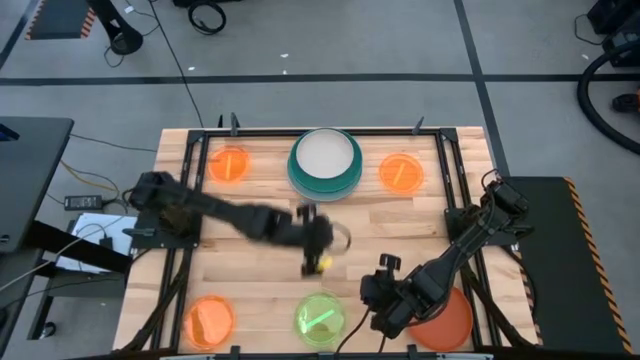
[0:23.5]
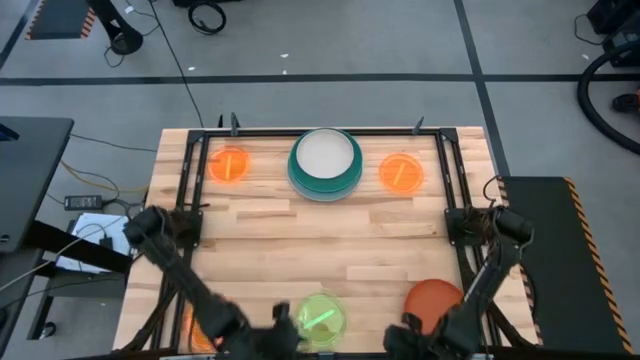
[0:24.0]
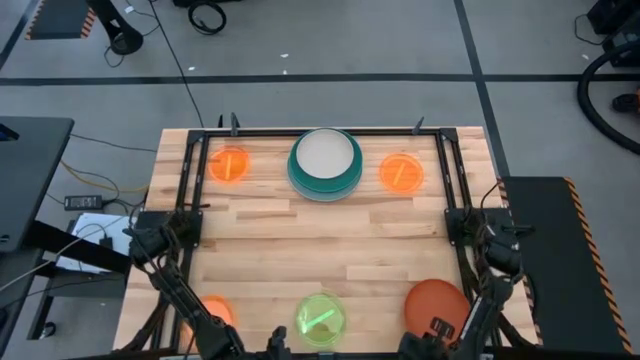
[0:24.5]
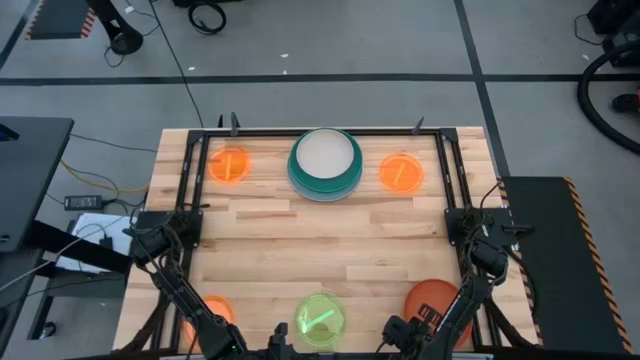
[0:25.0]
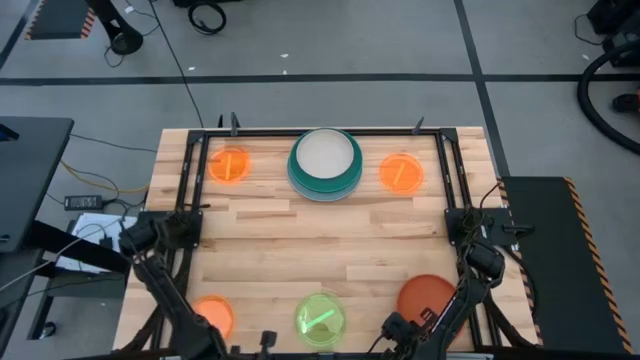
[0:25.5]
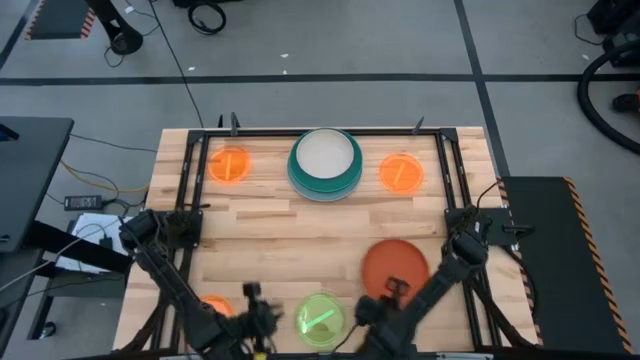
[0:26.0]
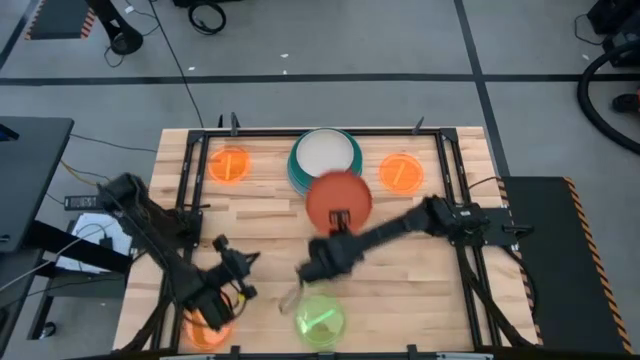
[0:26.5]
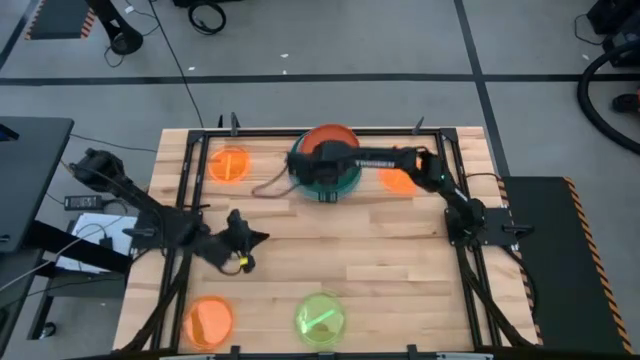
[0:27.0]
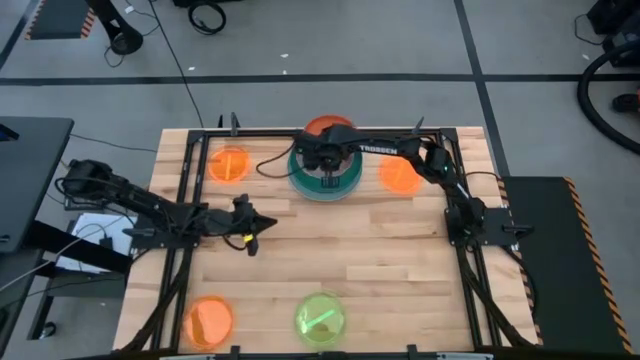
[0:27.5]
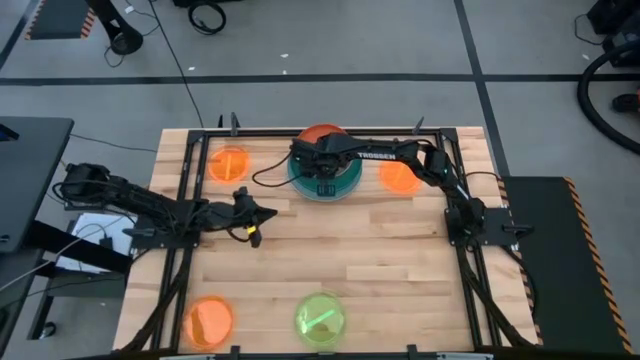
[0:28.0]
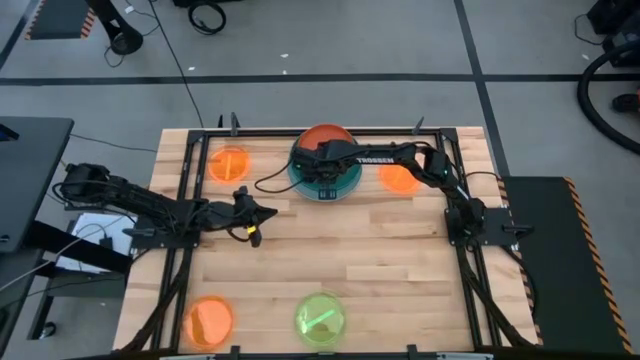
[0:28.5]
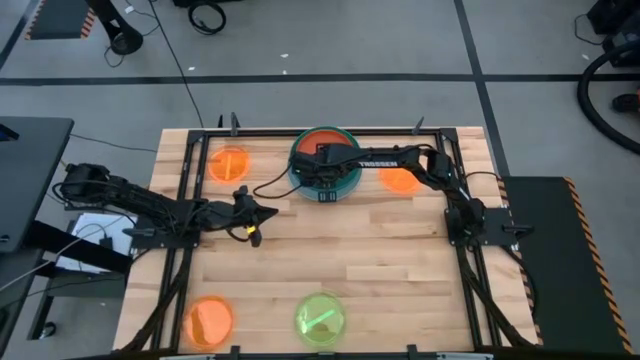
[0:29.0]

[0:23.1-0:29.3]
Task: Stack plastic plates
Stack the dark orange plate on top of the gray plate

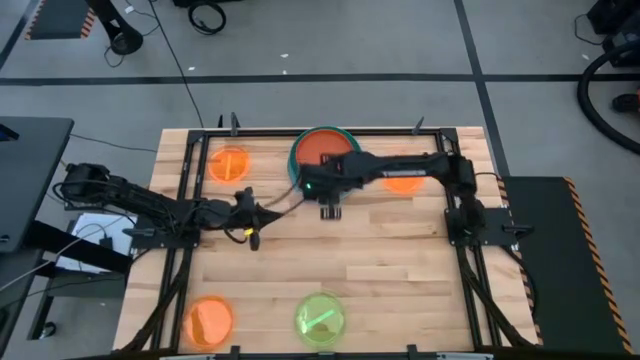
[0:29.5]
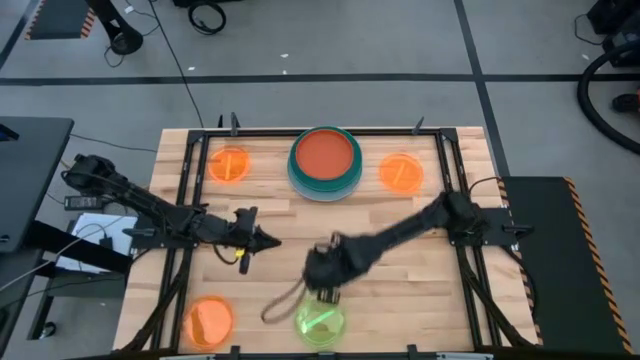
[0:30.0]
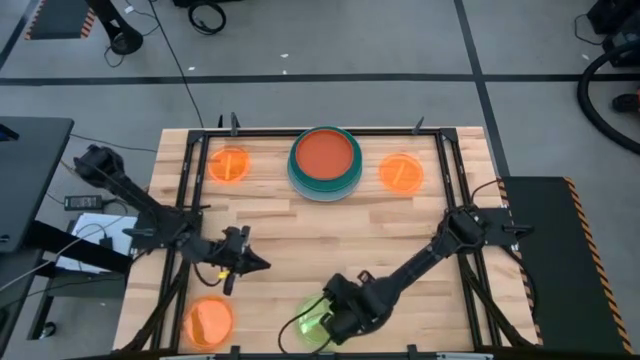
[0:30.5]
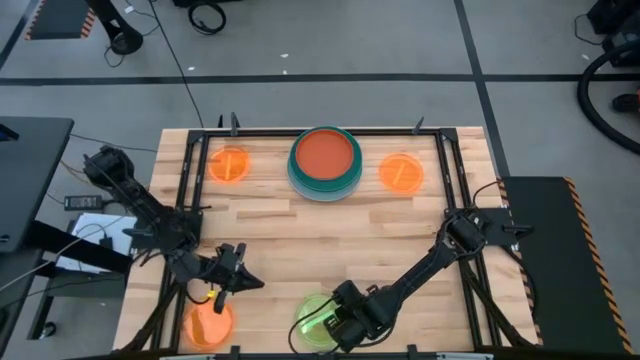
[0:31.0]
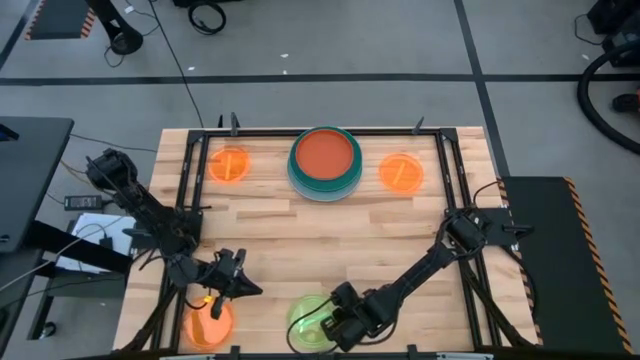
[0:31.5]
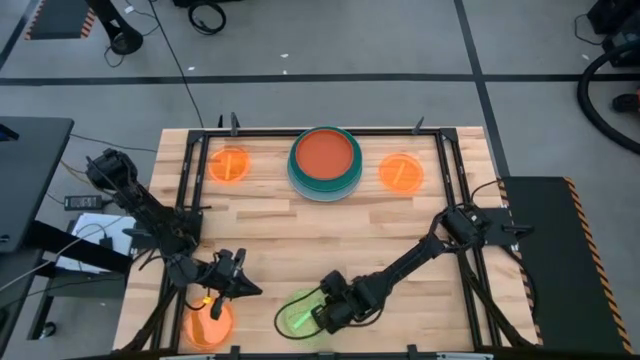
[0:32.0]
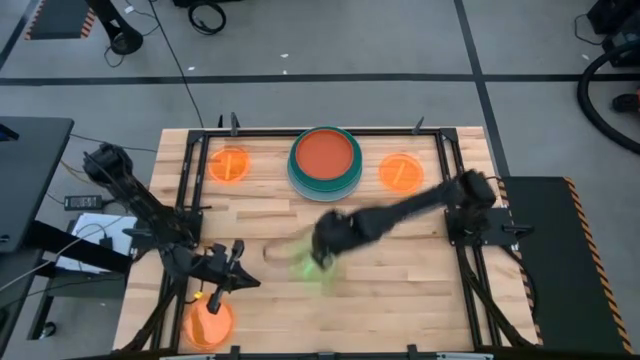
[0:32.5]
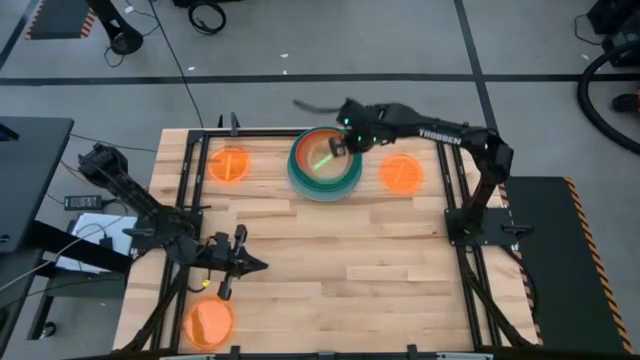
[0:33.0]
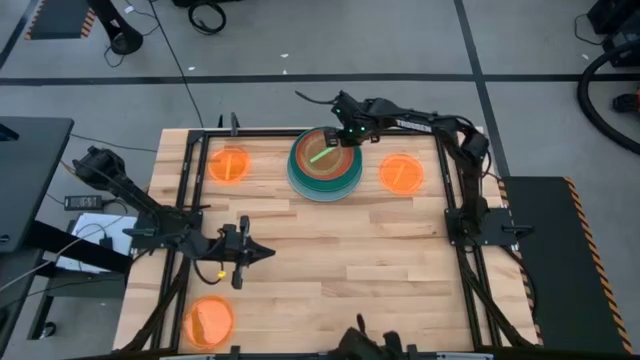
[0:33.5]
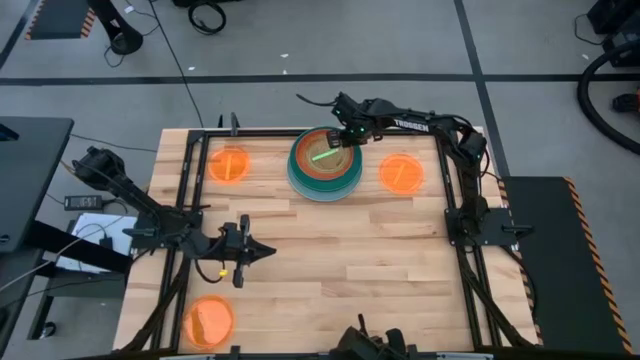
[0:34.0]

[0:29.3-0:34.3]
Stack the light green plate on top of the dark orange plate

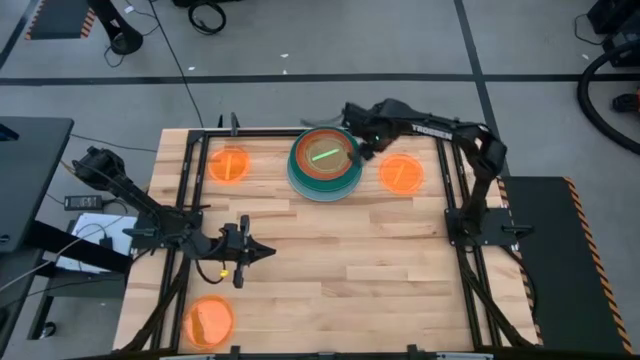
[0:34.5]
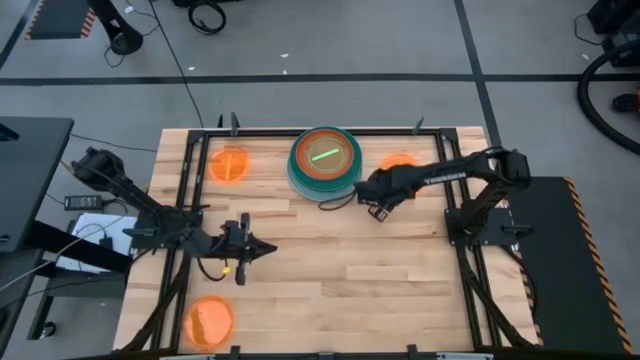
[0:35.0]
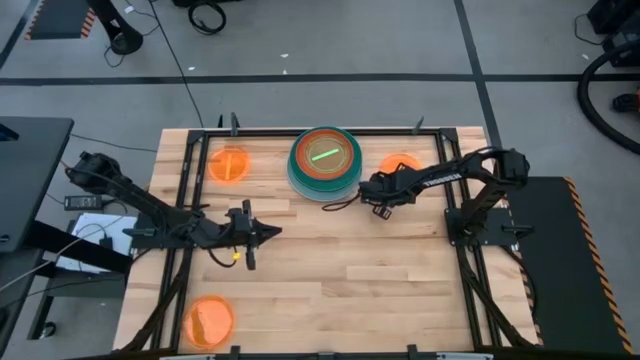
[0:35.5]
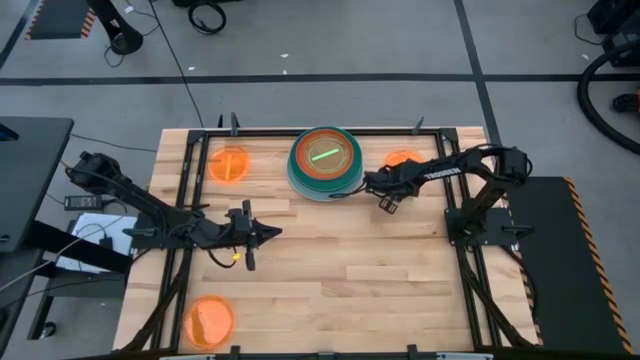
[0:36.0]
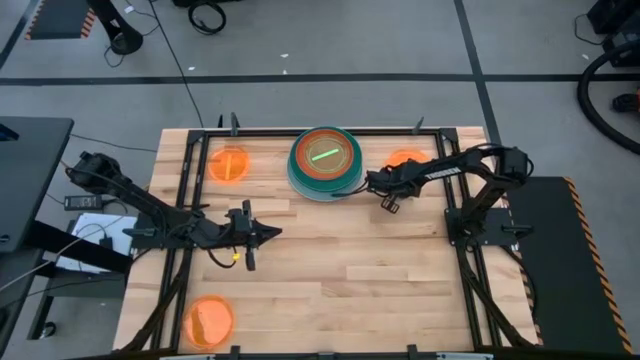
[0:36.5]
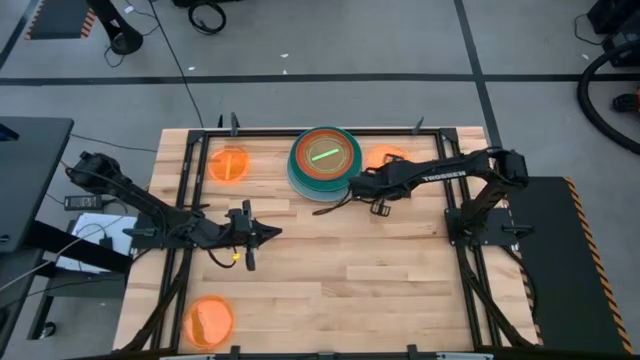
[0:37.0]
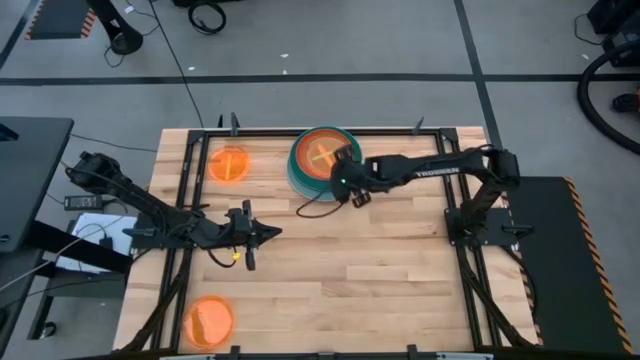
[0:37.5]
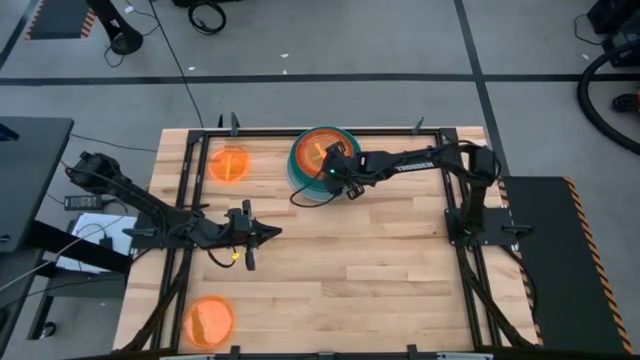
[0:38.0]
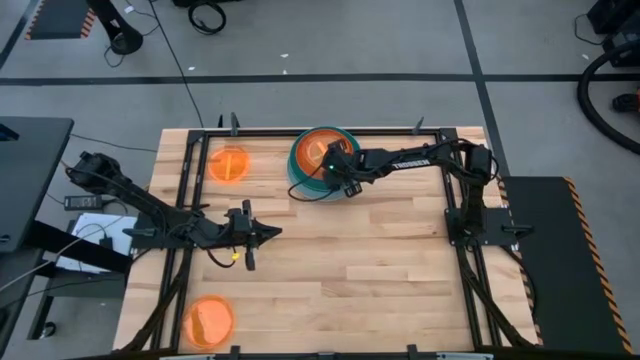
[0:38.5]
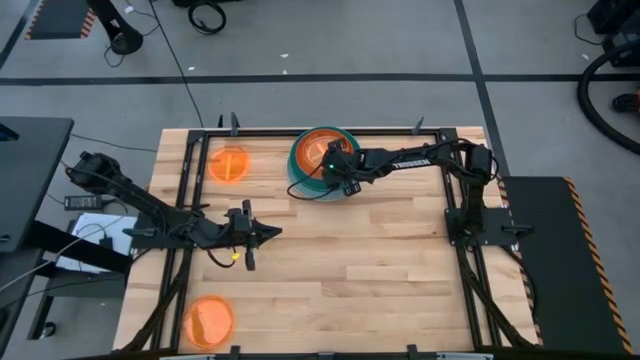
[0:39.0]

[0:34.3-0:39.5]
Stack the top right orange plate on top of light green plate

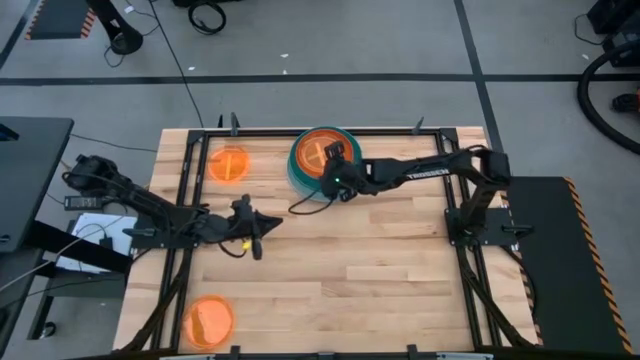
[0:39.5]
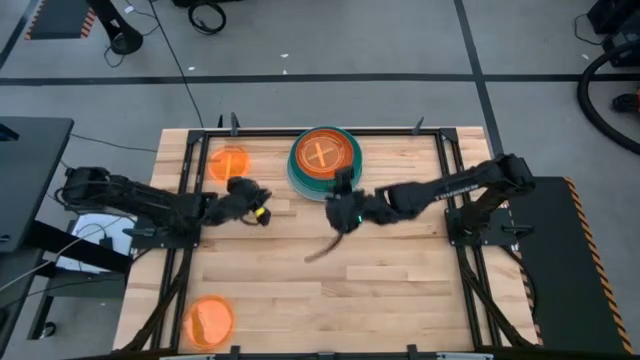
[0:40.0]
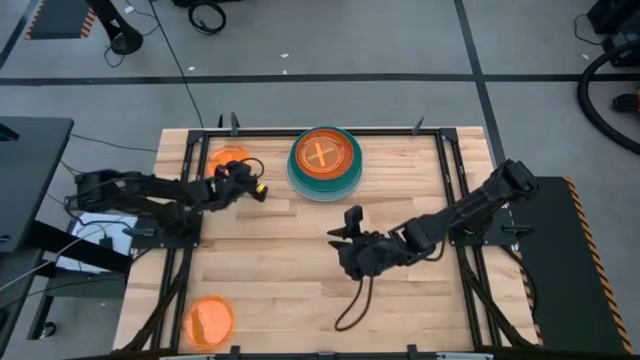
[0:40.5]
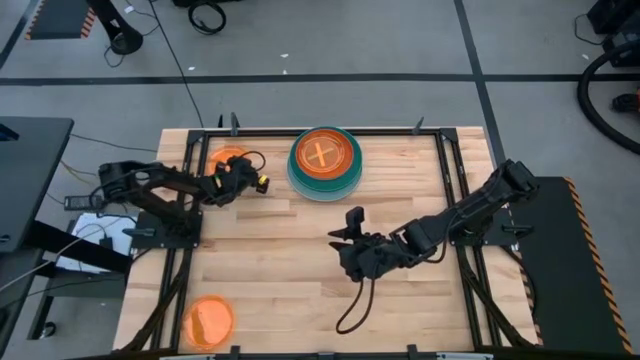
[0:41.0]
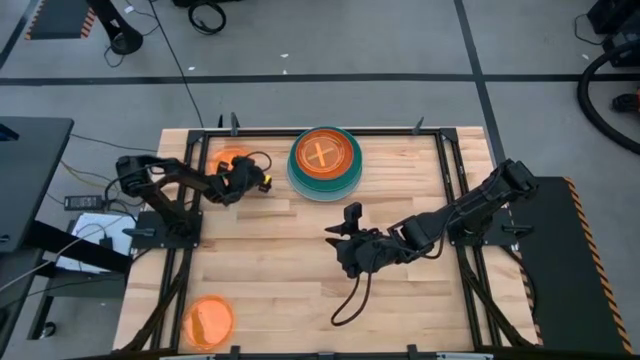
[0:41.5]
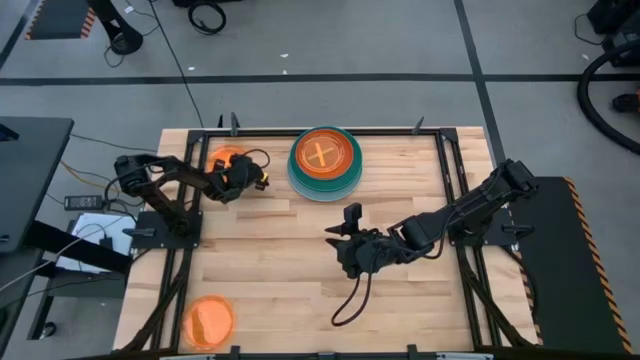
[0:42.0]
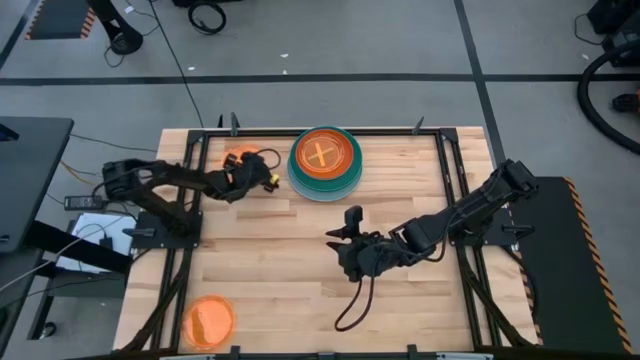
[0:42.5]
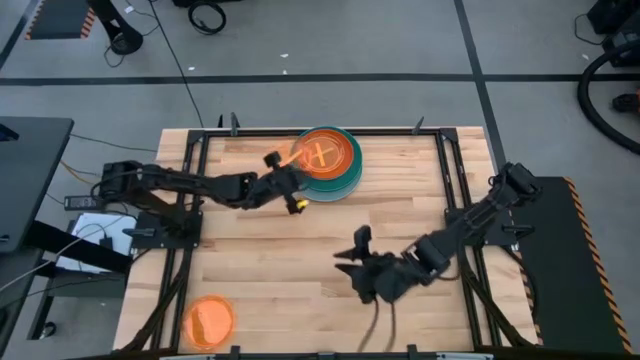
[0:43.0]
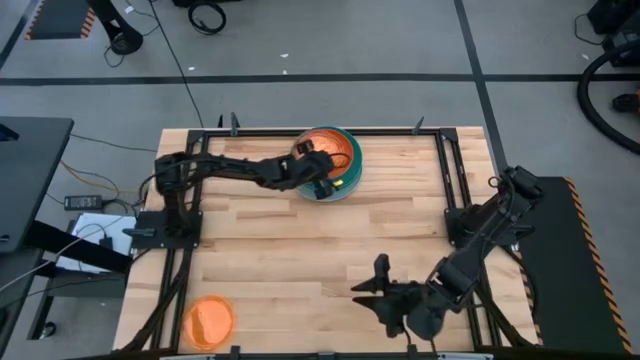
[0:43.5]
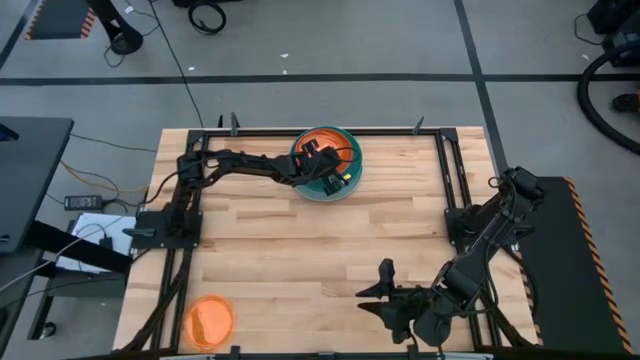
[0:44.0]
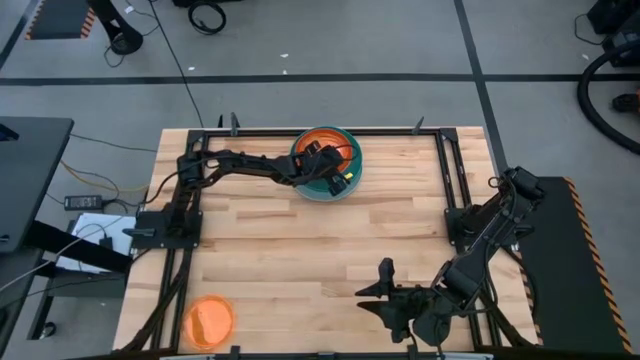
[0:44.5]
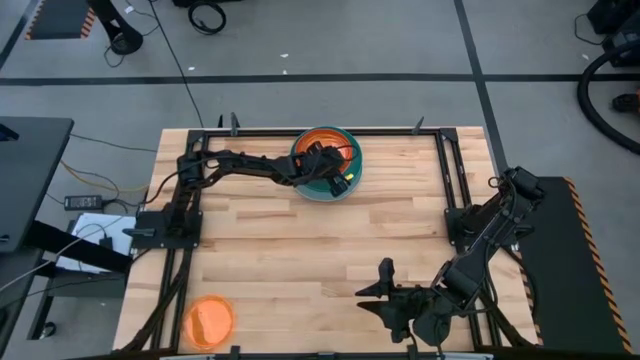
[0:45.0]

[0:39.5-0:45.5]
Stack the top left orange plate on top of the orange plate
